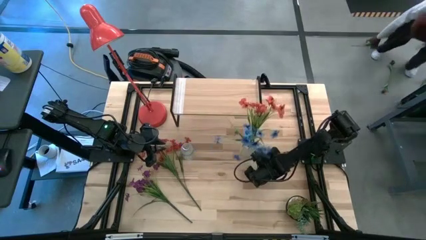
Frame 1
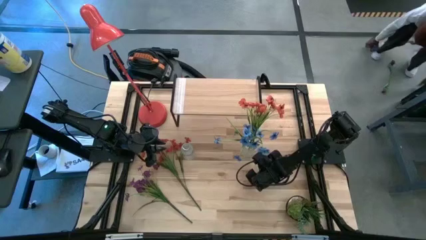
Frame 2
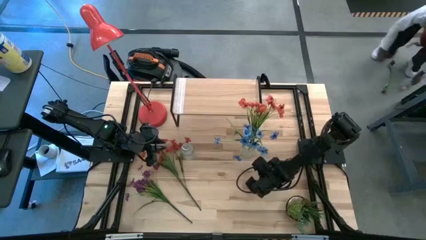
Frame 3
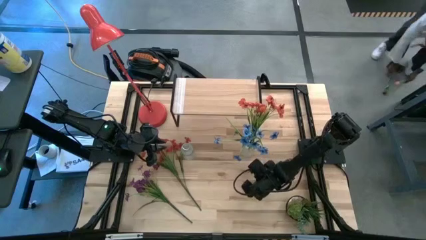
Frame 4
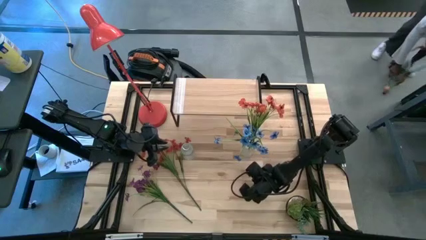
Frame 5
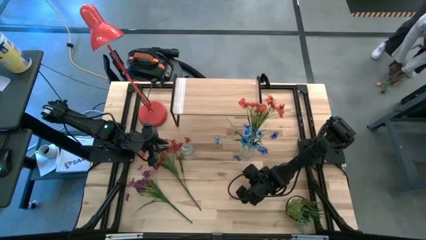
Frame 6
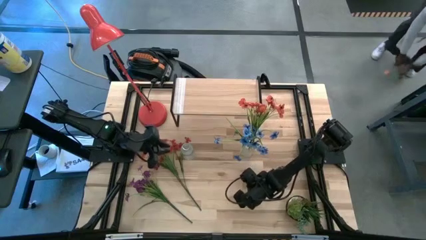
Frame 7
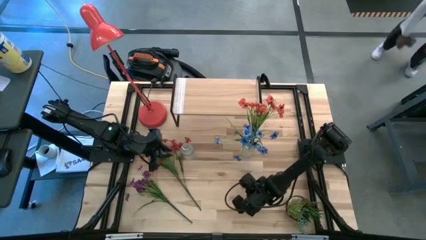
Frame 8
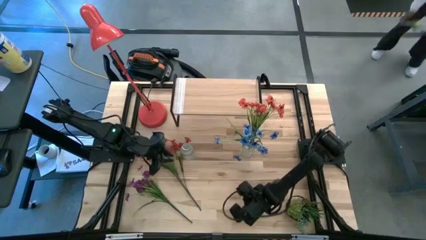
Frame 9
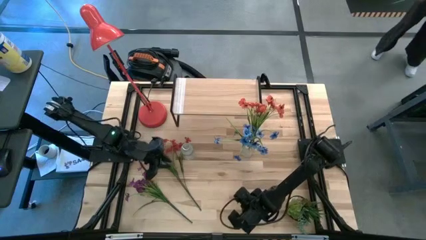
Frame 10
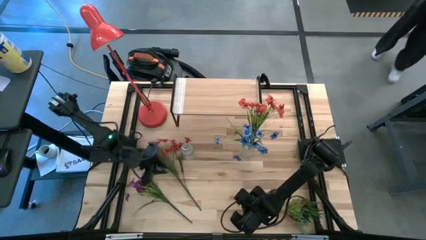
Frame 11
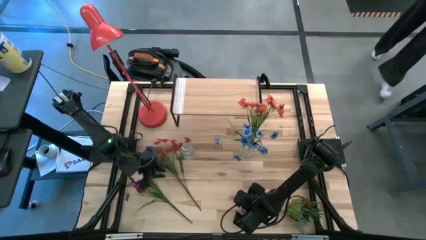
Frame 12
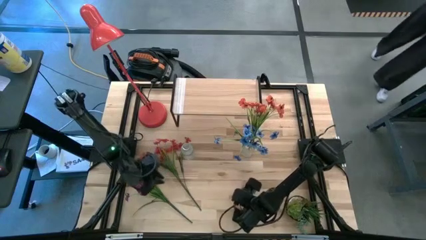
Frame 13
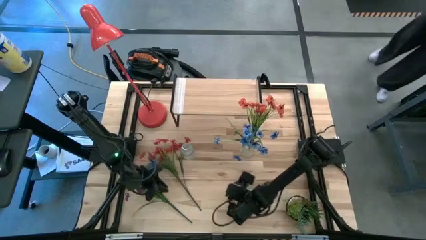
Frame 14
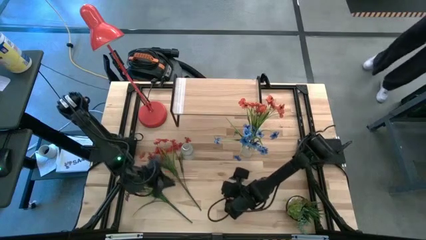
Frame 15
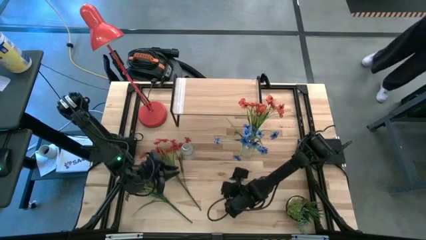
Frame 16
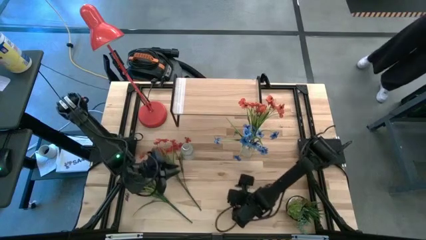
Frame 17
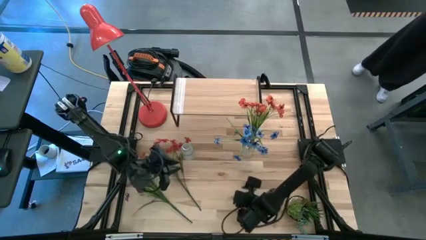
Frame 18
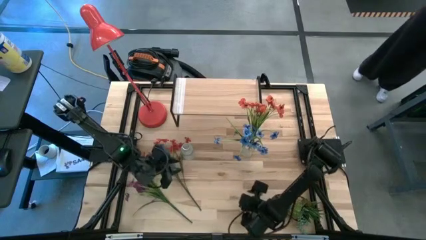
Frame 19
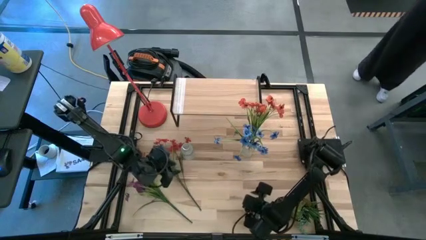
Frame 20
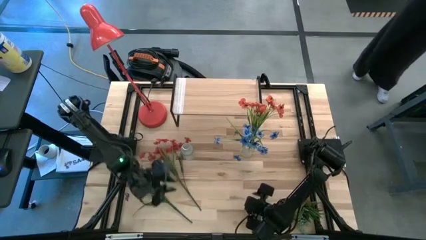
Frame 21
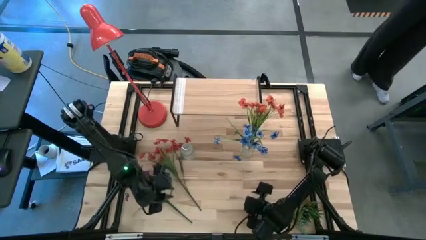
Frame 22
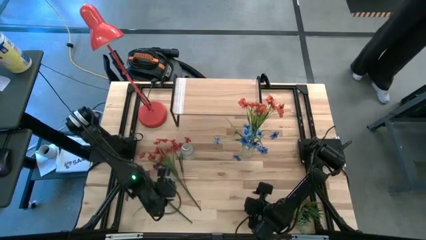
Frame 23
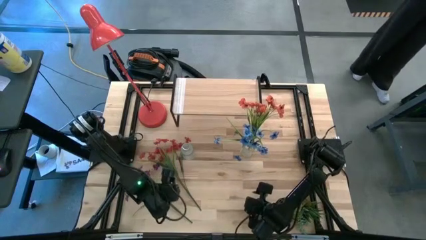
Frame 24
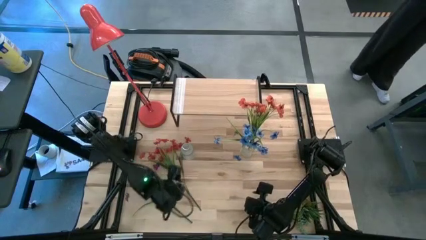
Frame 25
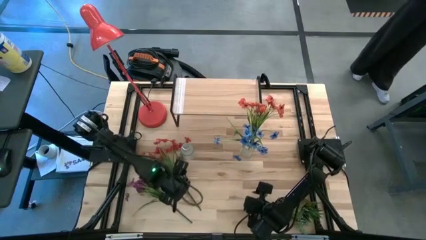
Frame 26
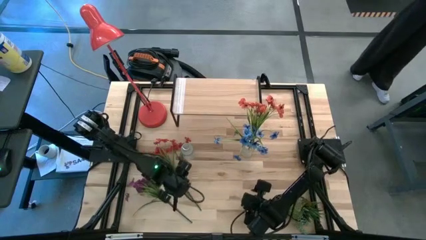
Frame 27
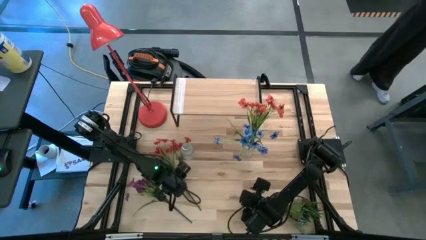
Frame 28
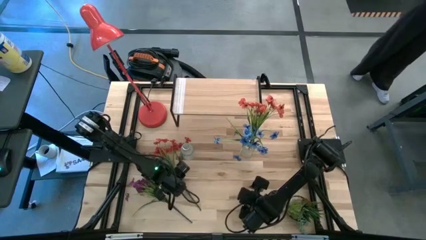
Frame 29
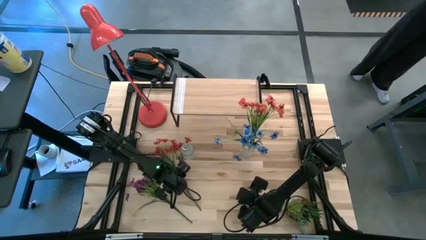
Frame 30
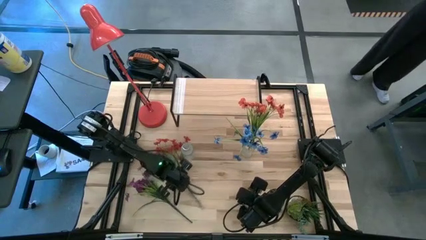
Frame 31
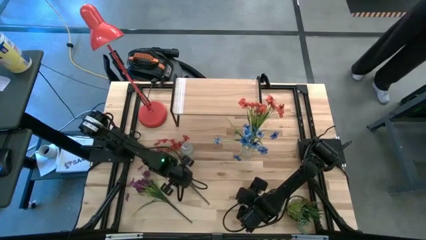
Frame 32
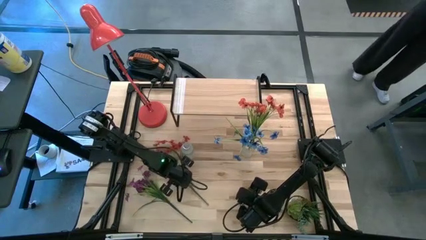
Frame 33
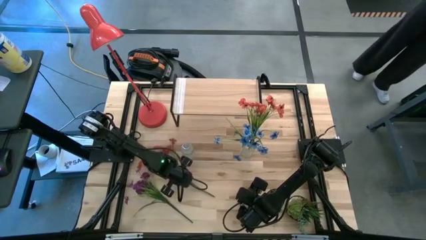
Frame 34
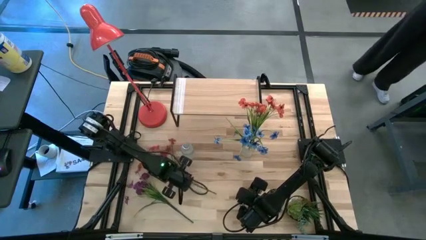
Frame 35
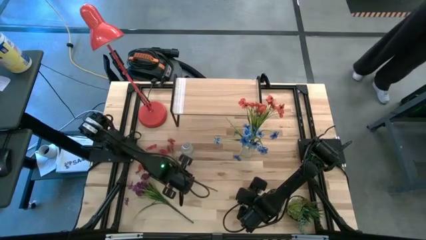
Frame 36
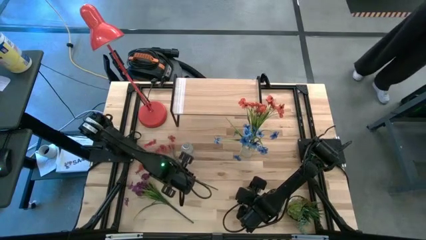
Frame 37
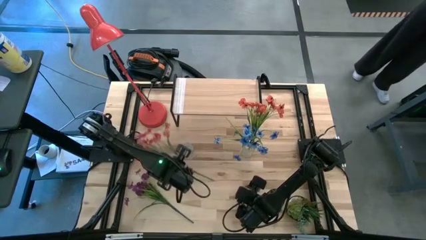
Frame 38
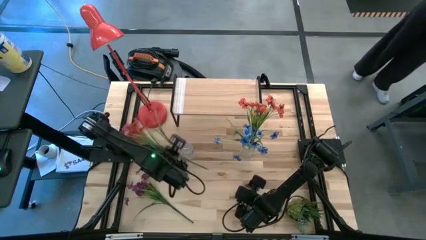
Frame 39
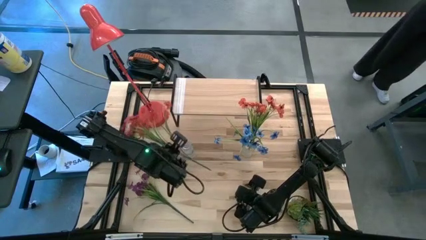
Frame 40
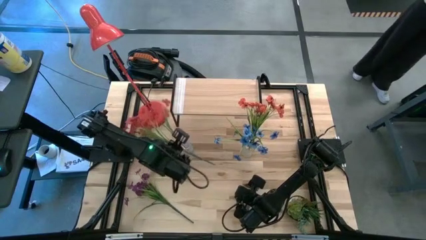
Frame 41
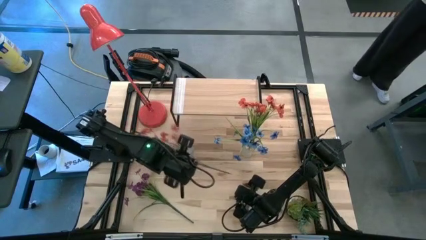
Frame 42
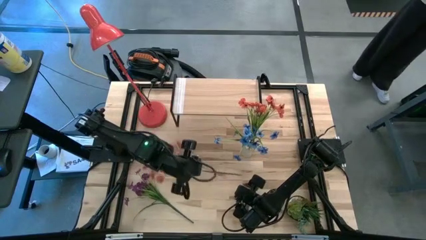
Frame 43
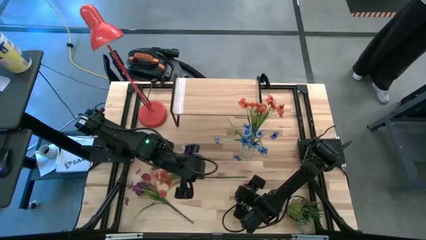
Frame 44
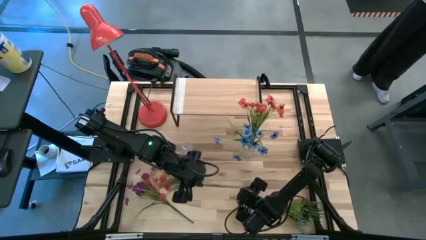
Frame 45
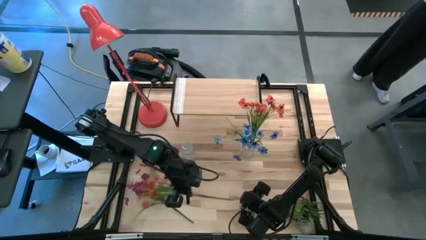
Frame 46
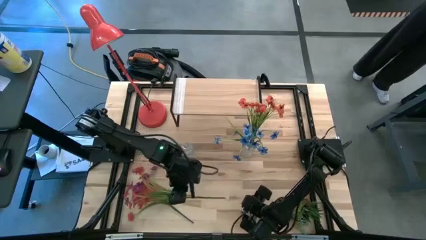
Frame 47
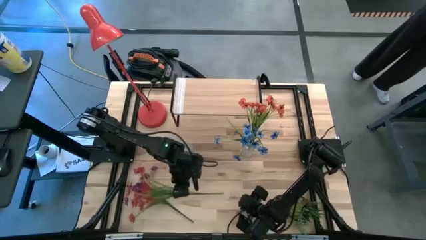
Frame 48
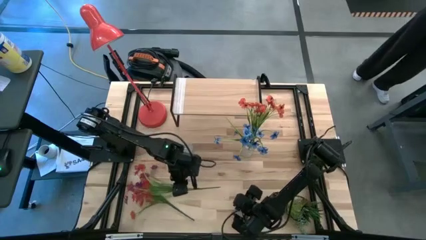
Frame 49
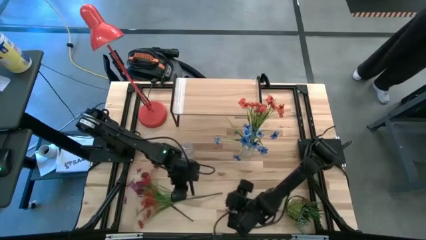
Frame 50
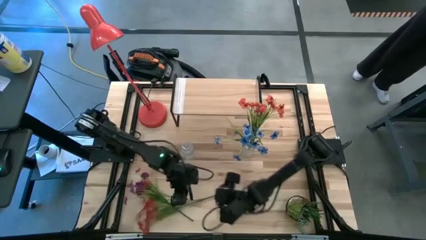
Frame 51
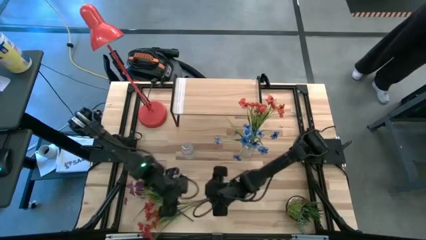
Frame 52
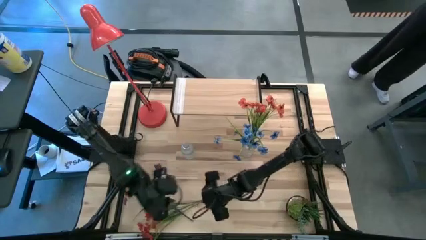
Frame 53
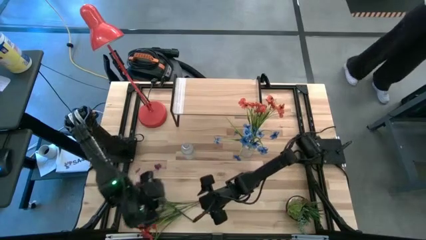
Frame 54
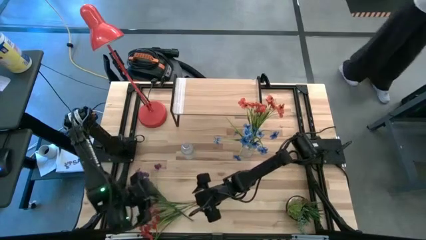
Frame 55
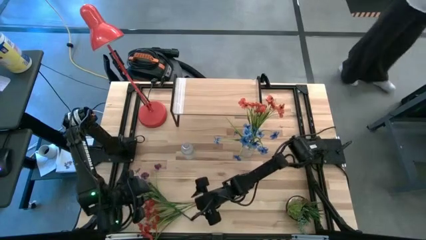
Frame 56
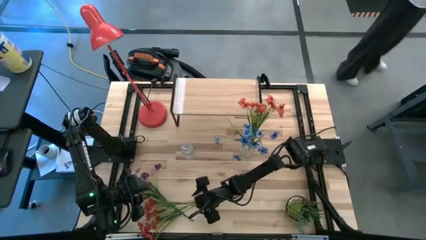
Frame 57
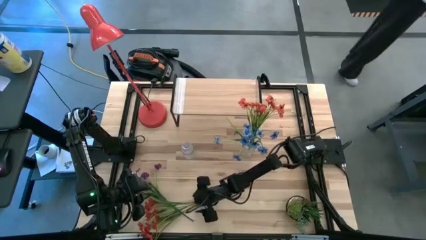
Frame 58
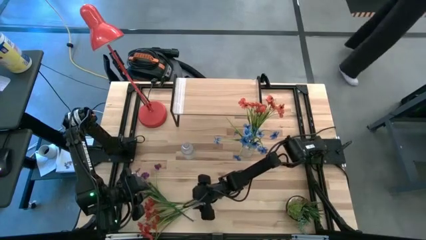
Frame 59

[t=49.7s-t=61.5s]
Task: Pick and place flowers into a vace then onto a shelf
Put the orange flowers into the left transparent flower vase
